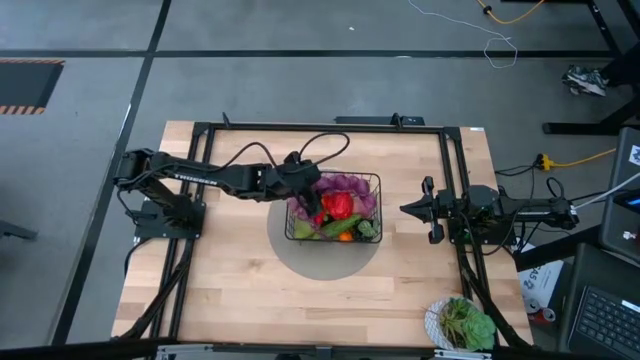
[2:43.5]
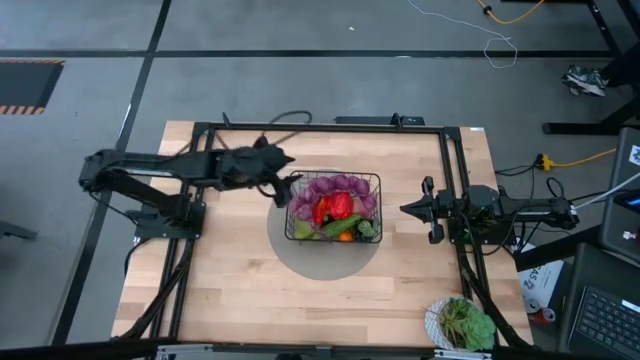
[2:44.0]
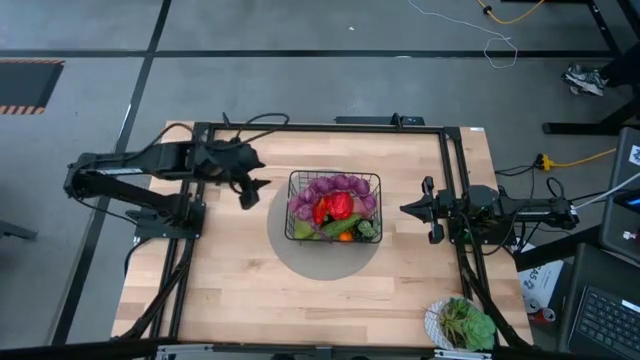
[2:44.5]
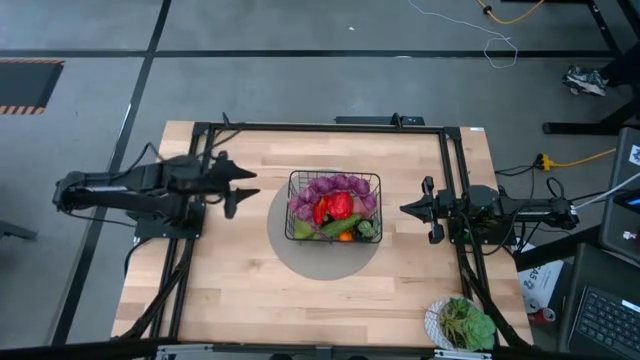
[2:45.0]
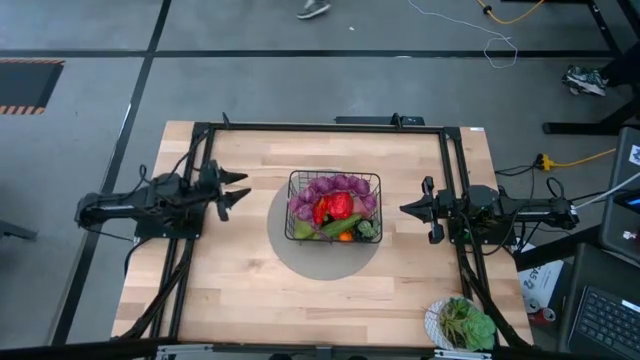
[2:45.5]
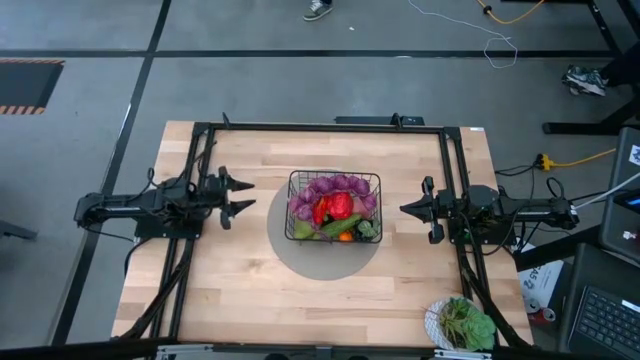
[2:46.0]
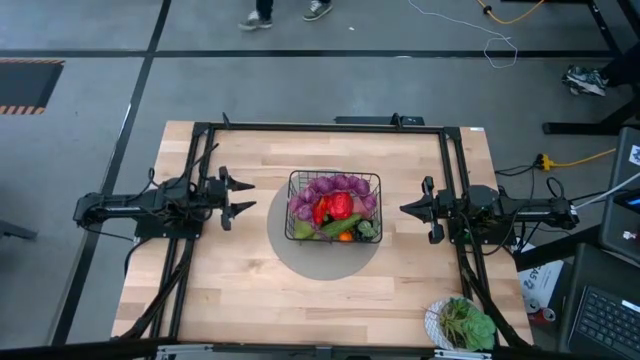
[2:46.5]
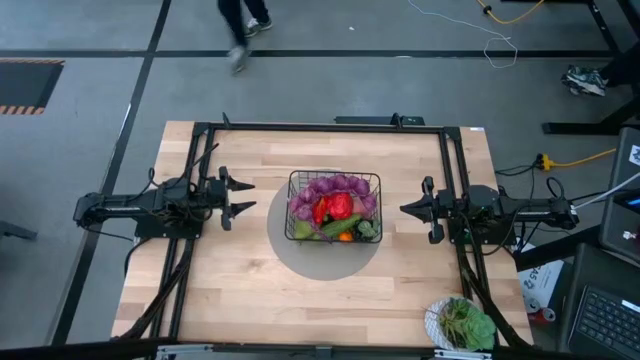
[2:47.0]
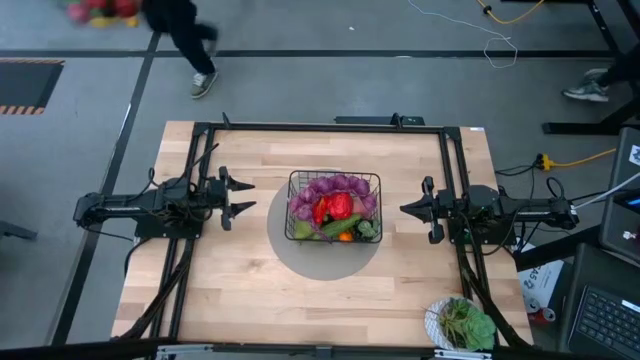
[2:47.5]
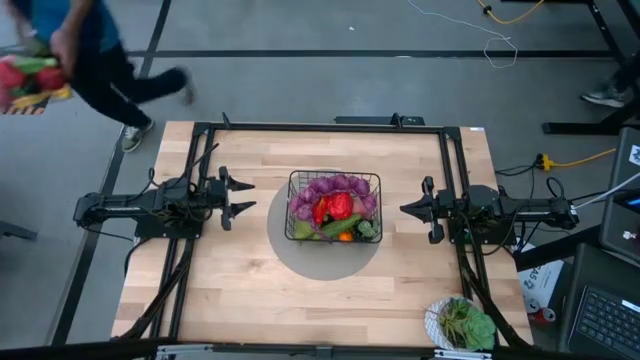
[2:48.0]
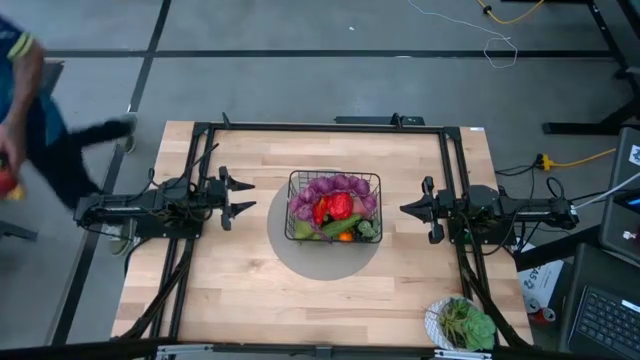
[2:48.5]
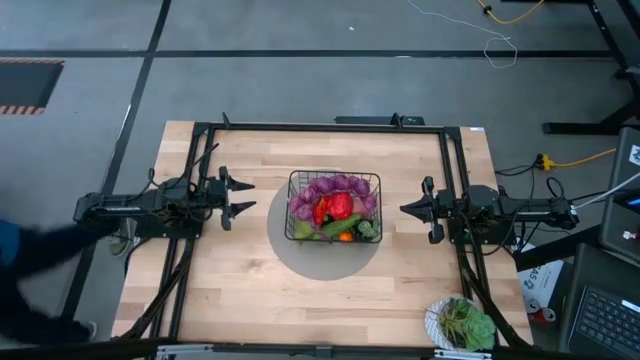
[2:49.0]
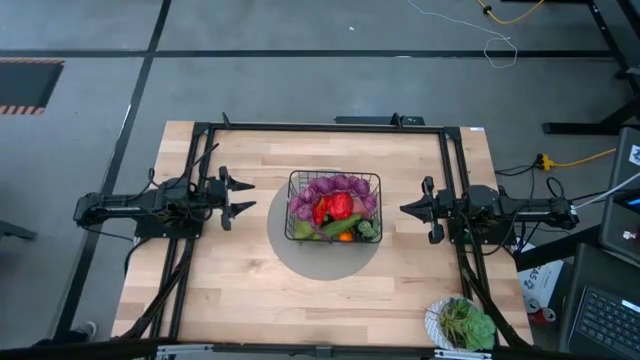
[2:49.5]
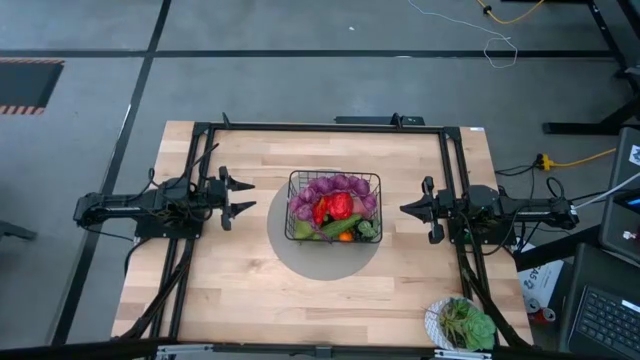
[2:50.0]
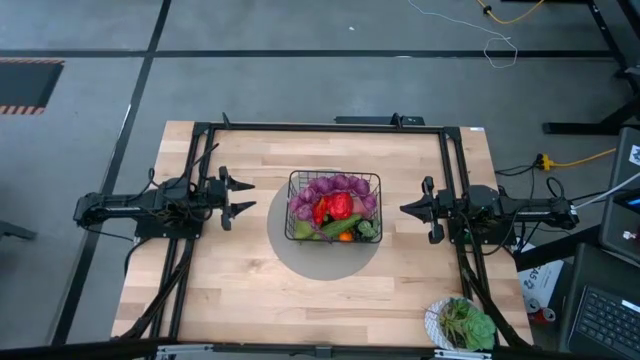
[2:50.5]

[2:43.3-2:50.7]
Task: Build produce basket
Return to Home Position

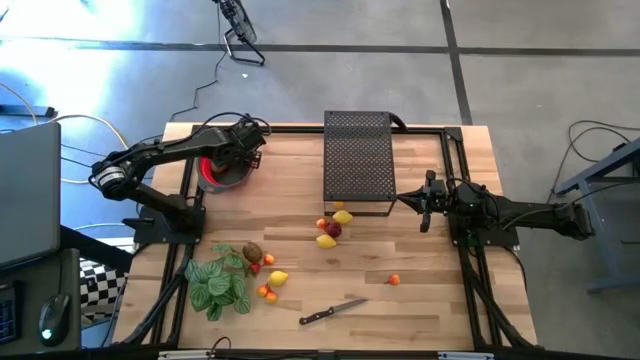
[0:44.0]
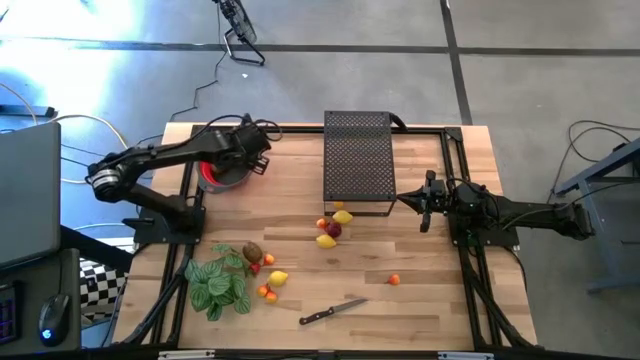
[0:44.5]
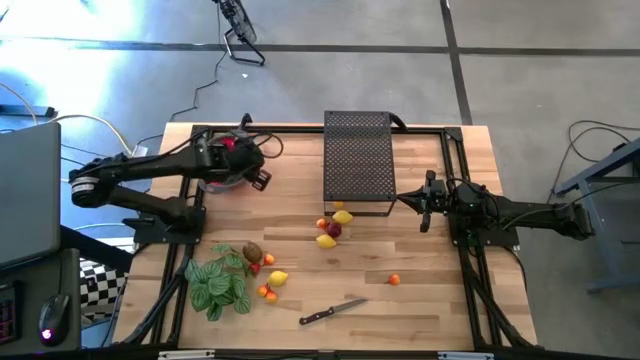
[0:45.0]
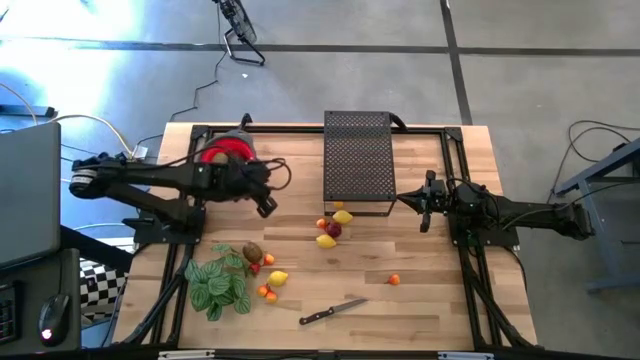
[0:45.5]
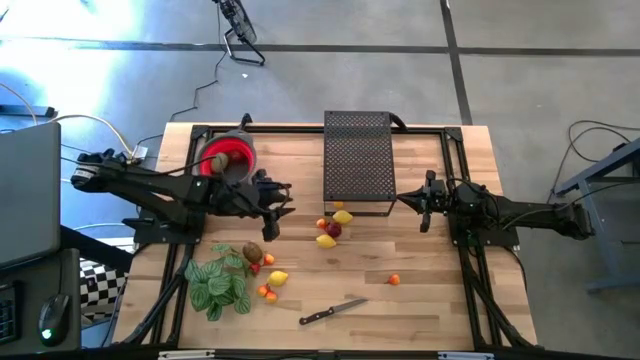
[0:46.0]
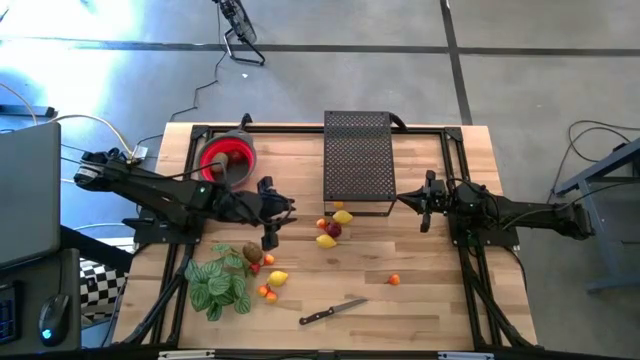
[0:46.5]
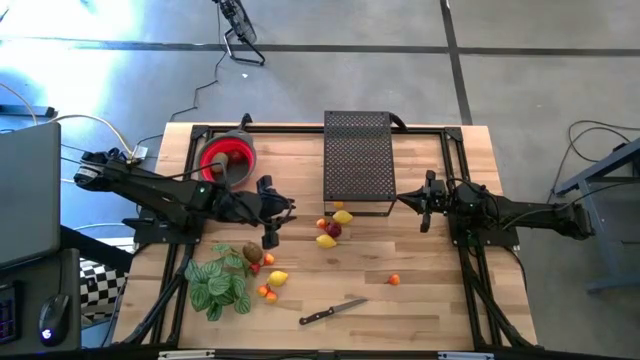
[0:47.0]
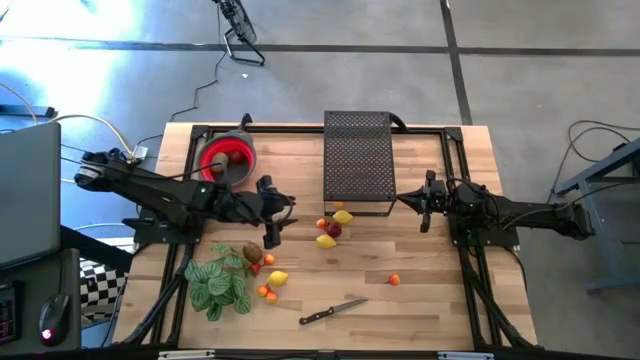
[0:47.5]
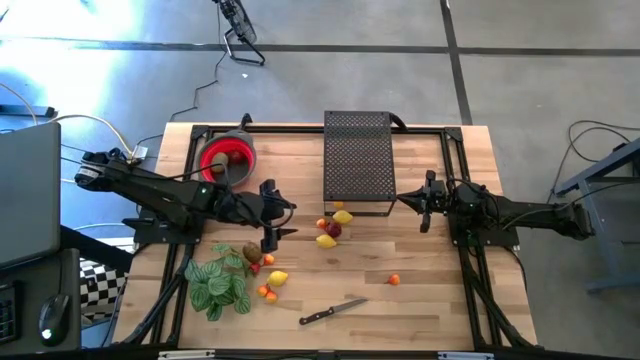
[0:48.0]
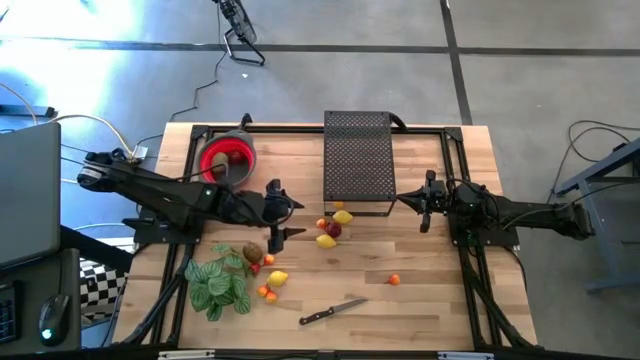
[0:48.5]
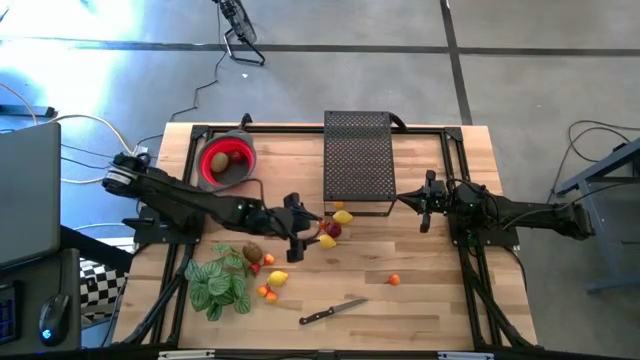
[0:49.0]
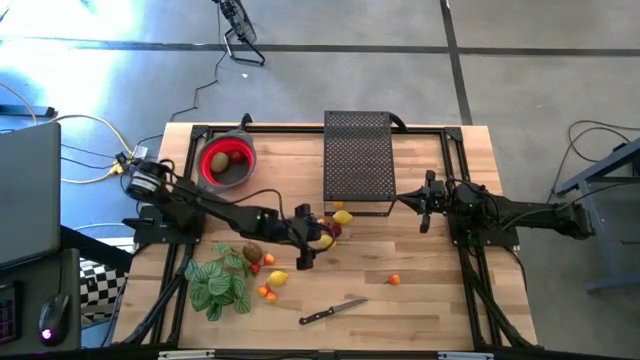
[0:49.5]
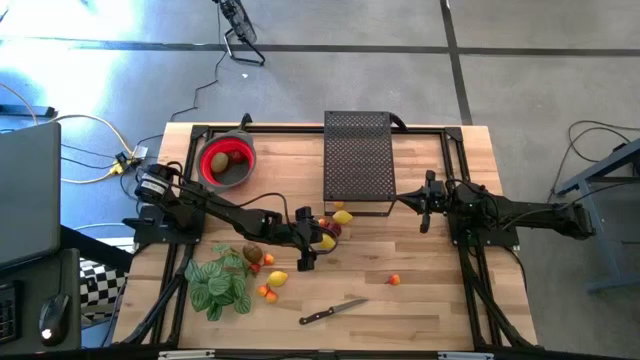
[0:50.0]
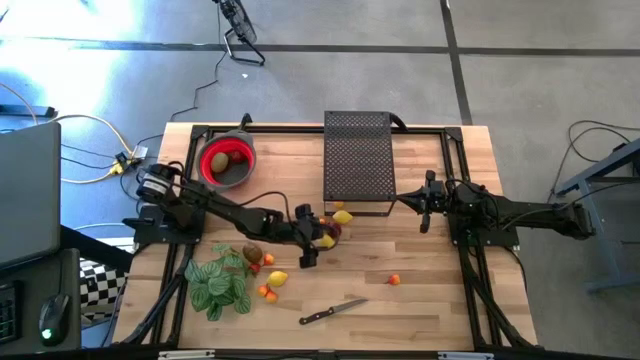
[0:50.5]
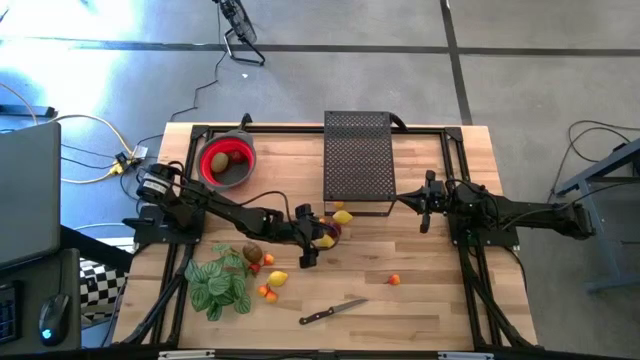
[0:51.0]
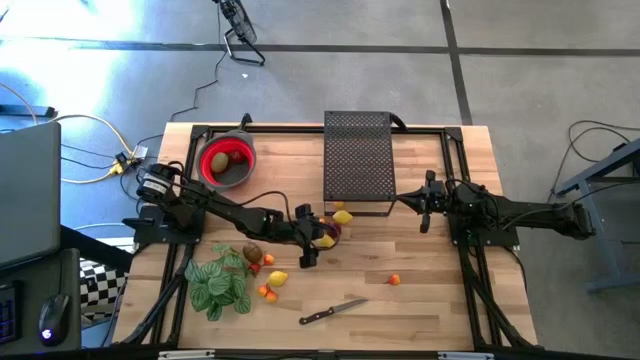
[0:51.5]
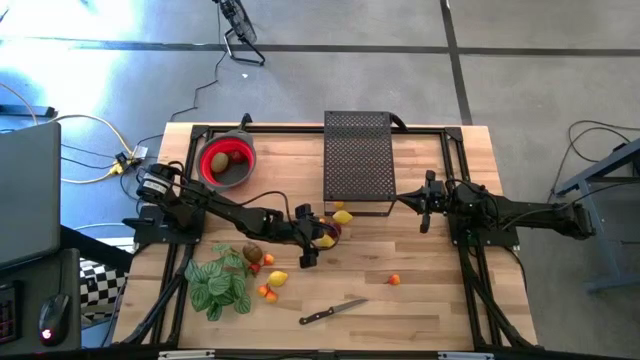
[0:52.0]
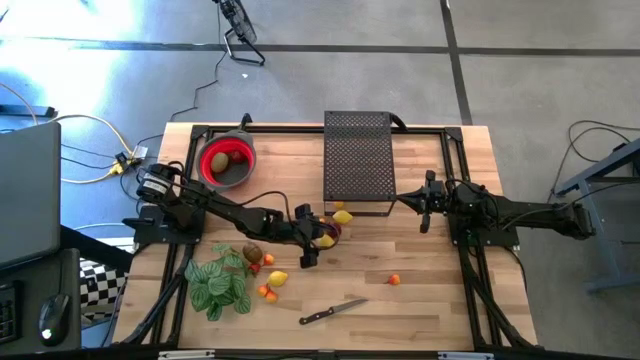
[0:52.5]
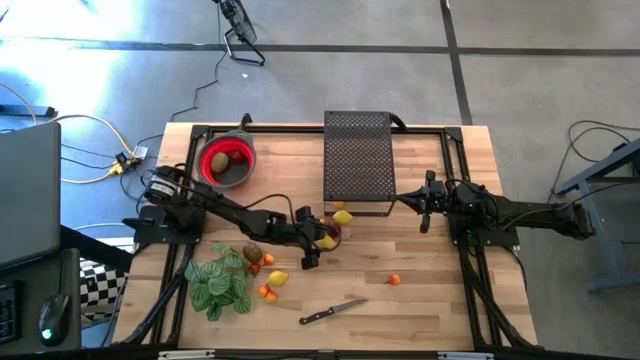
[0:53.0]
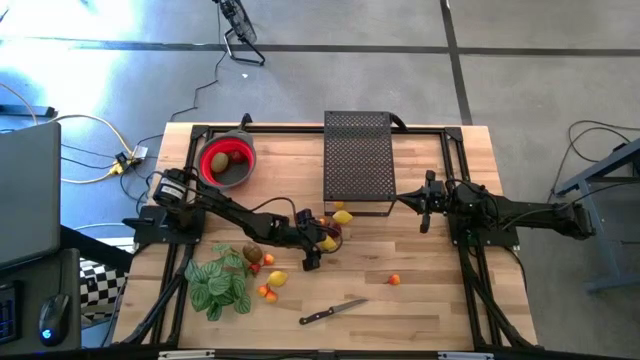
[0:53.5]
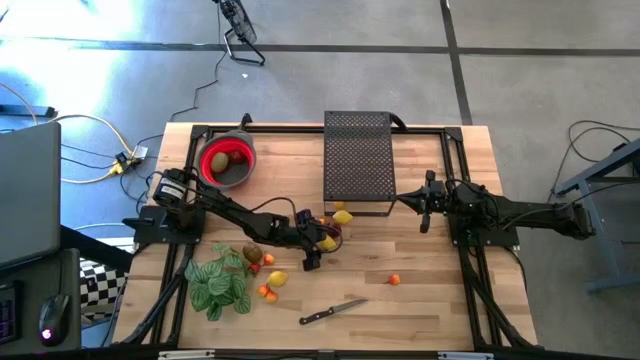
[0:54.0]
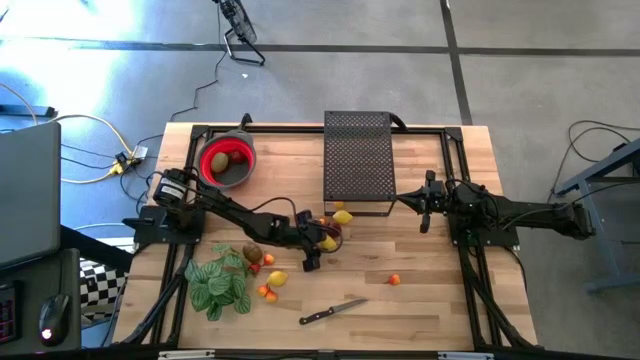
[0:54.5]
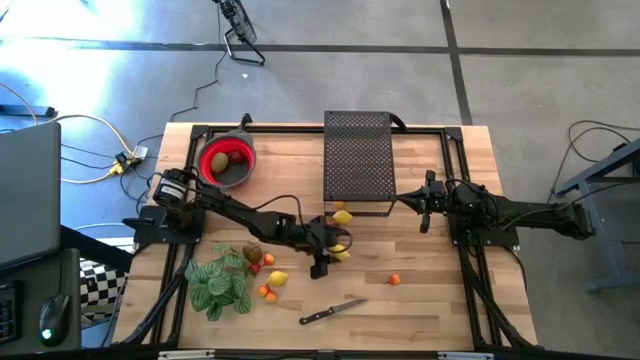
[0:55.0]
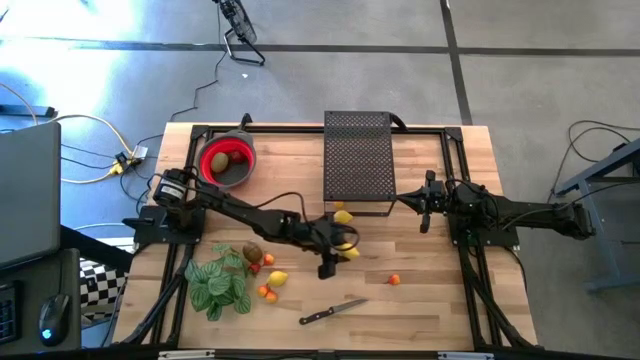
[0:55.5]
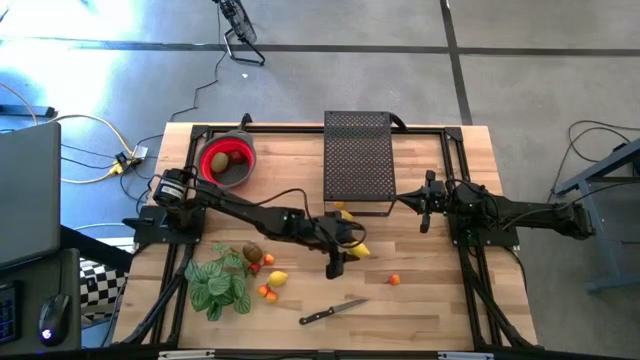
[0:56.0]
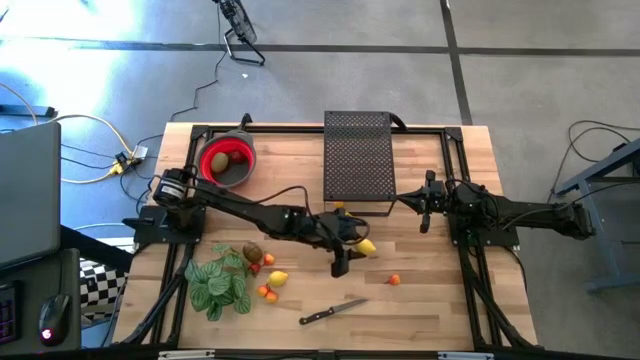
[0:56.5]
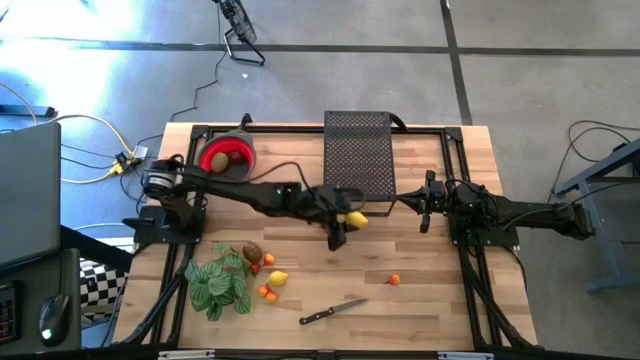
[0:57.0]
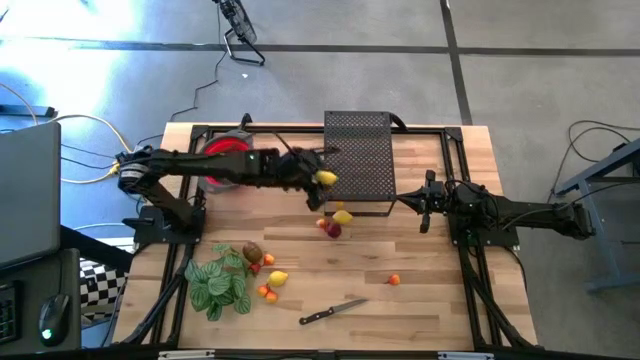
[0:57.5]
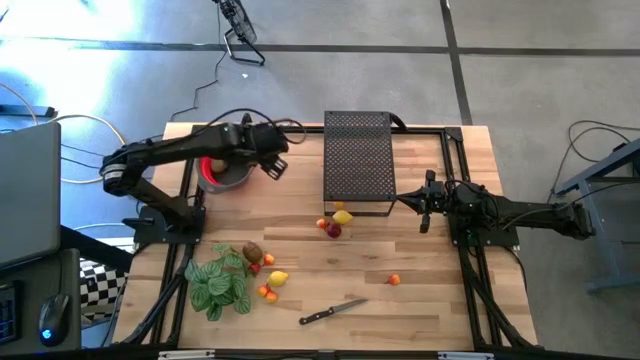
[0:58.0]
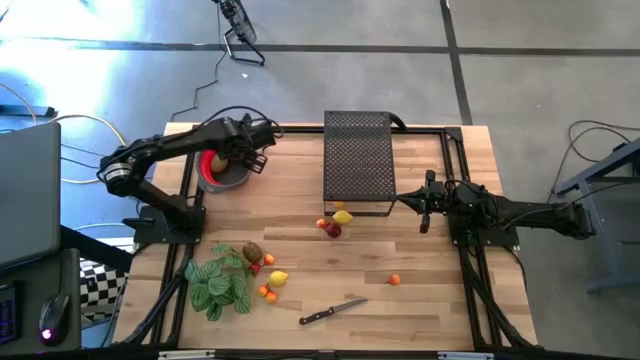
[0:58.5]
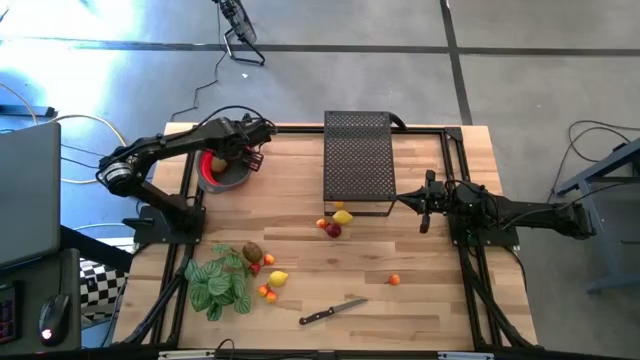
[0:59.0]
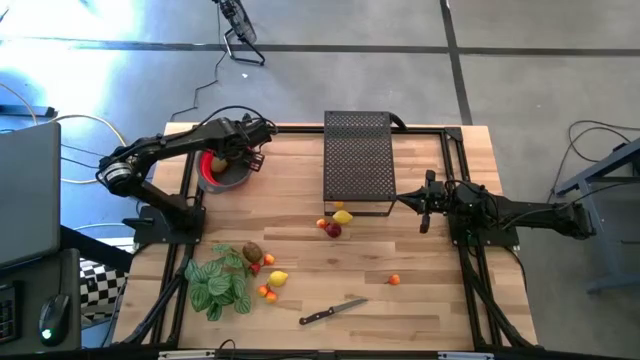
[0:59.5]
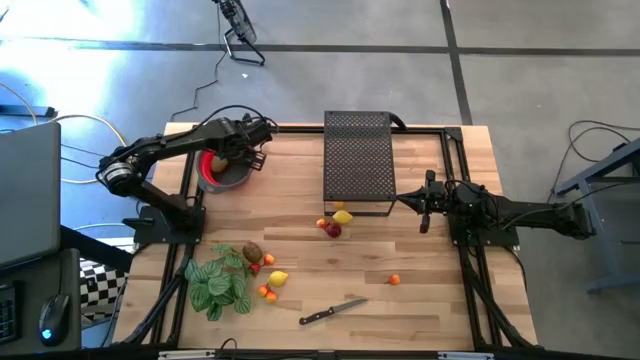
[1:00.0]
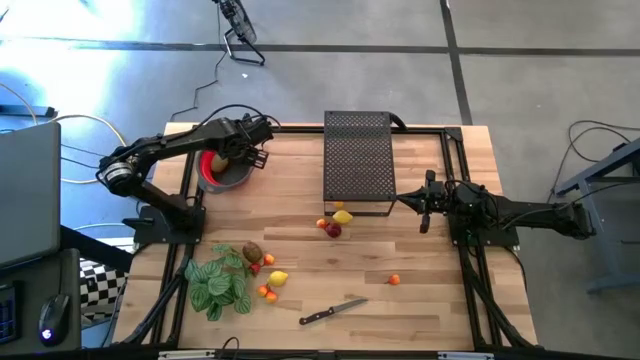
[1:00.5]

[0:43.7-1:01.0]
Task: Pick & Place Fruit
Put the middle yellow lemon into the strainer bowl
